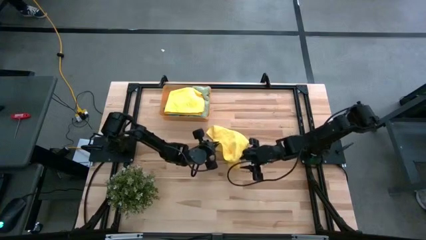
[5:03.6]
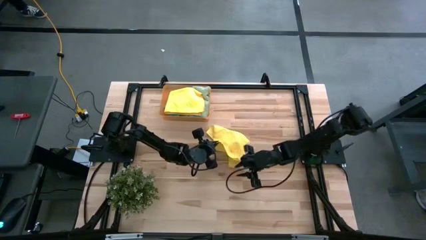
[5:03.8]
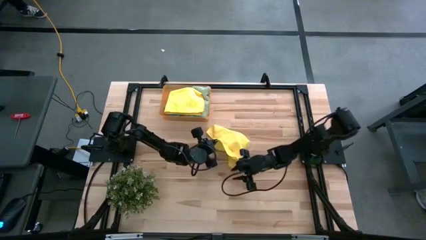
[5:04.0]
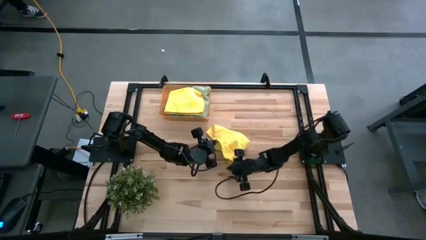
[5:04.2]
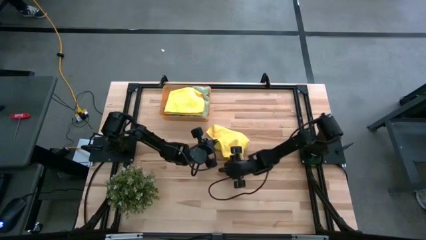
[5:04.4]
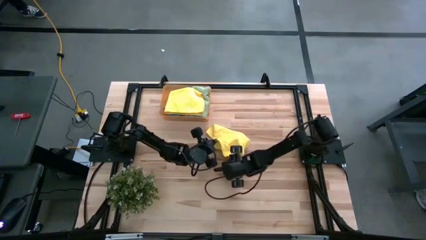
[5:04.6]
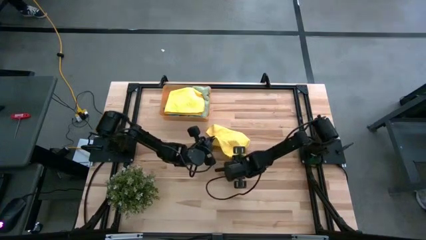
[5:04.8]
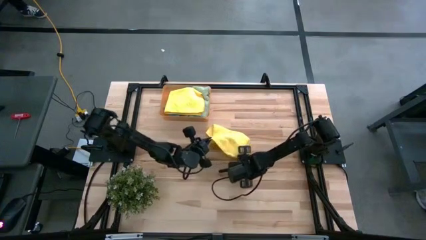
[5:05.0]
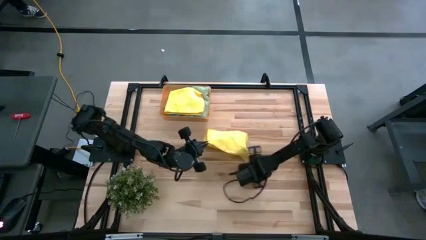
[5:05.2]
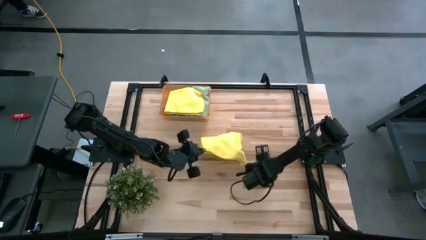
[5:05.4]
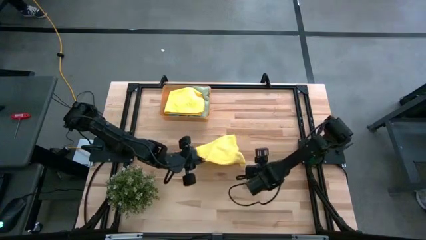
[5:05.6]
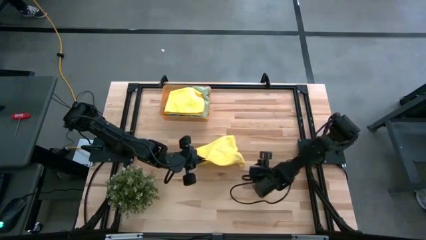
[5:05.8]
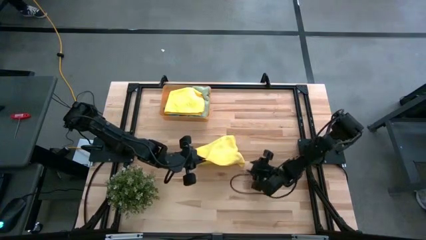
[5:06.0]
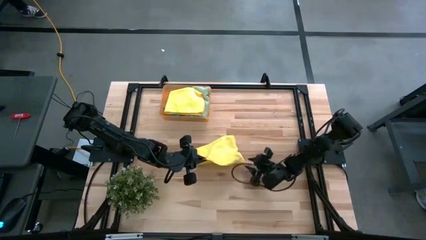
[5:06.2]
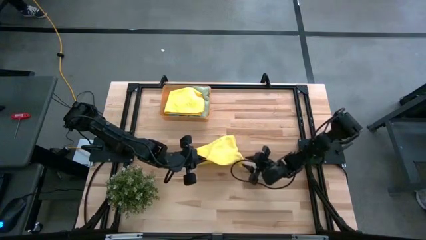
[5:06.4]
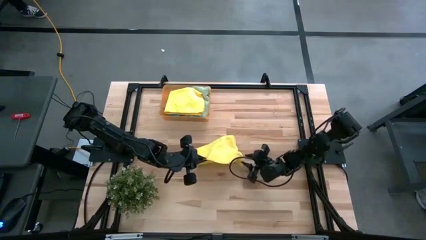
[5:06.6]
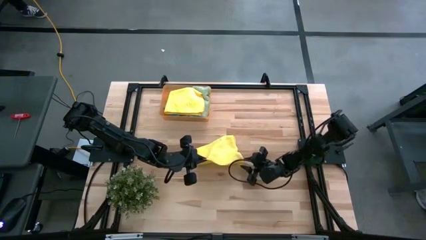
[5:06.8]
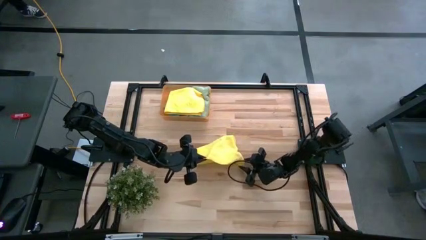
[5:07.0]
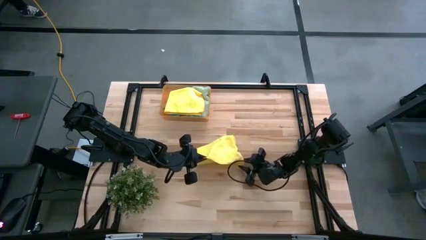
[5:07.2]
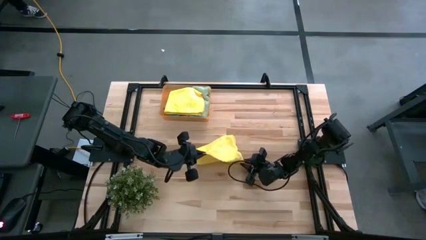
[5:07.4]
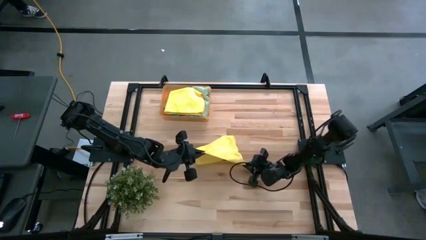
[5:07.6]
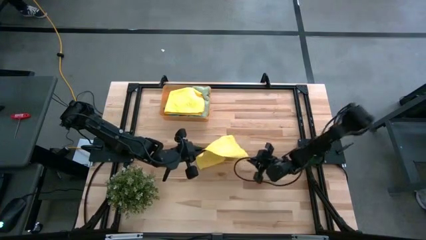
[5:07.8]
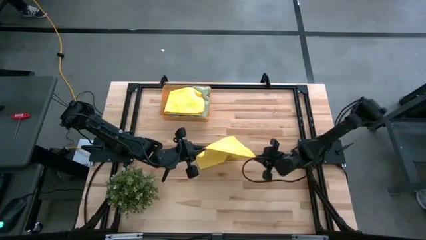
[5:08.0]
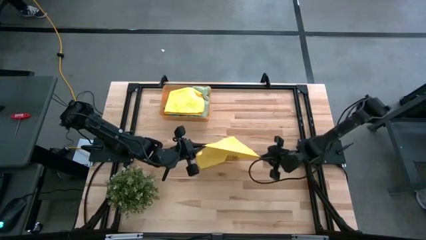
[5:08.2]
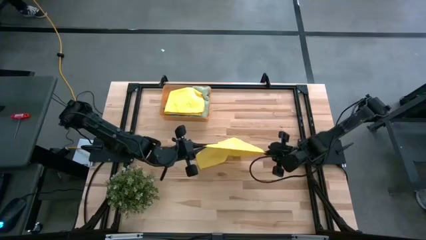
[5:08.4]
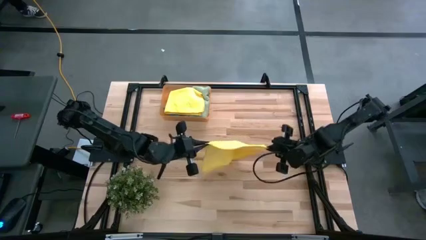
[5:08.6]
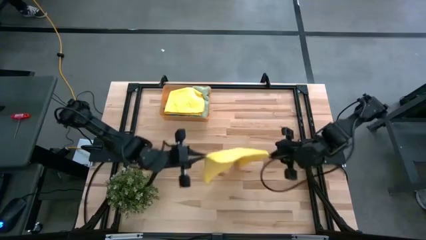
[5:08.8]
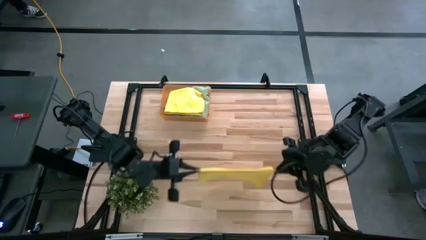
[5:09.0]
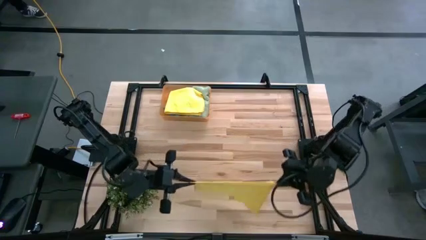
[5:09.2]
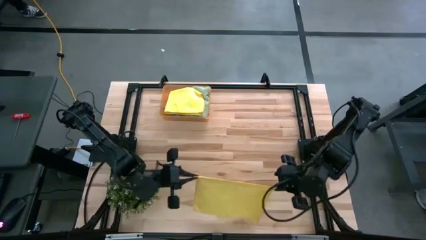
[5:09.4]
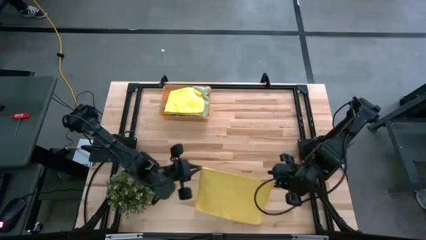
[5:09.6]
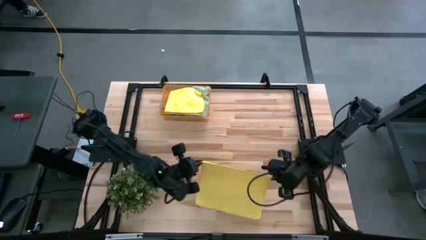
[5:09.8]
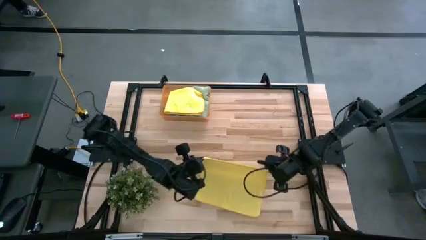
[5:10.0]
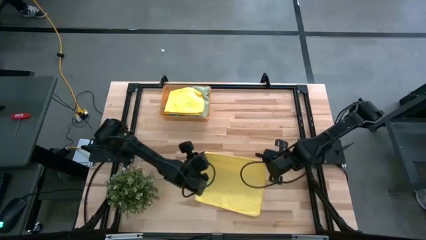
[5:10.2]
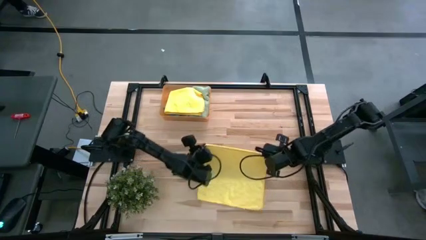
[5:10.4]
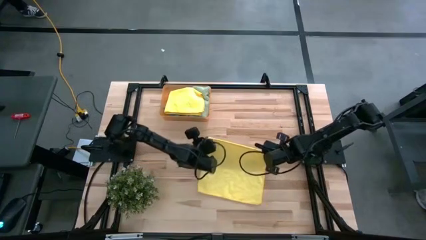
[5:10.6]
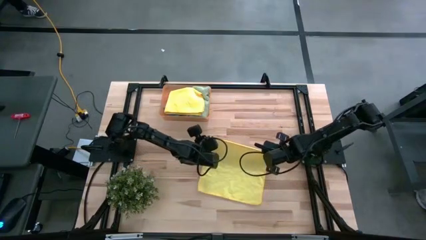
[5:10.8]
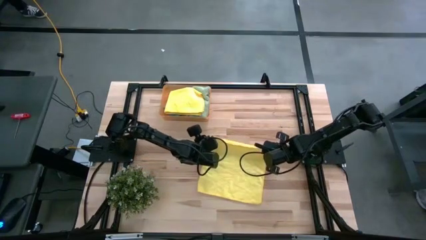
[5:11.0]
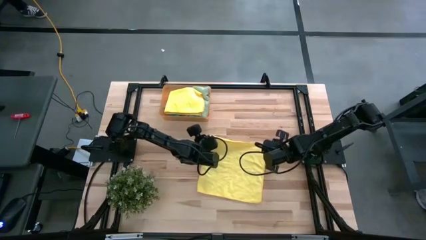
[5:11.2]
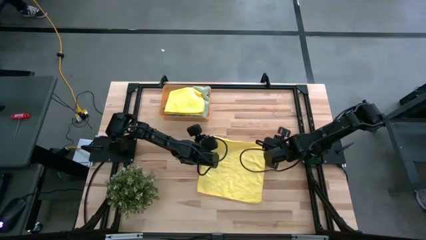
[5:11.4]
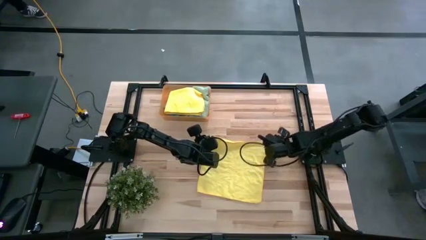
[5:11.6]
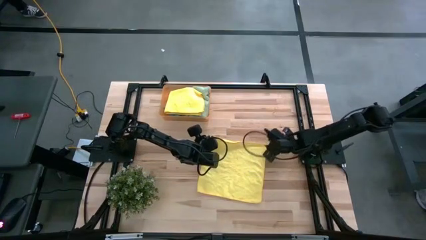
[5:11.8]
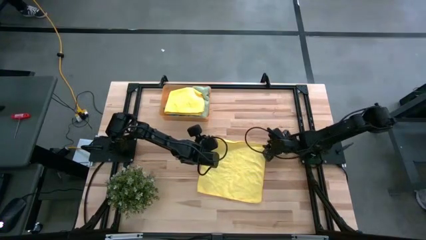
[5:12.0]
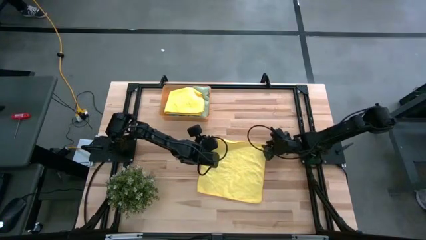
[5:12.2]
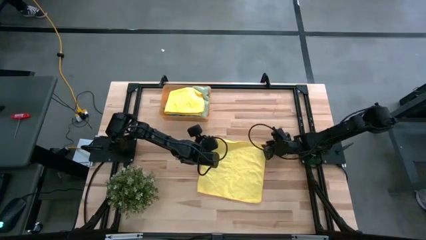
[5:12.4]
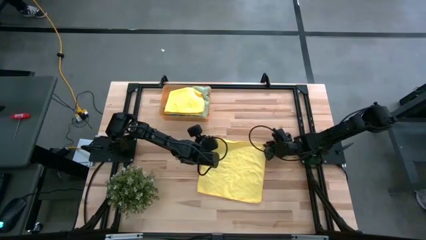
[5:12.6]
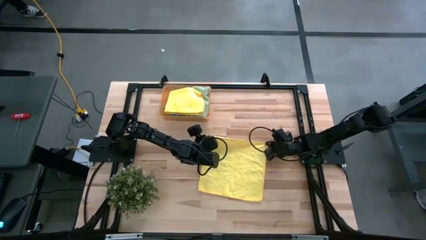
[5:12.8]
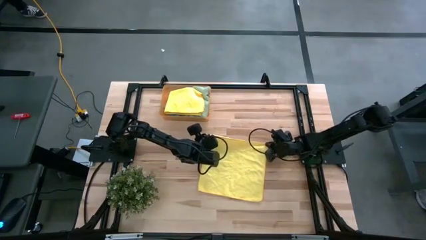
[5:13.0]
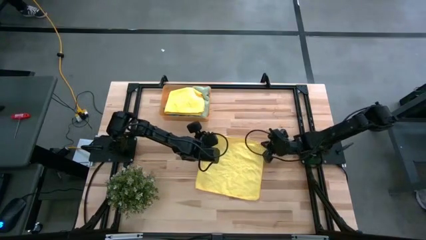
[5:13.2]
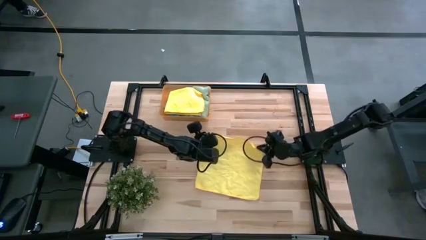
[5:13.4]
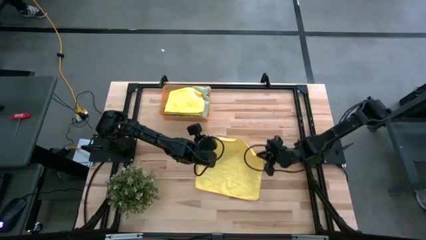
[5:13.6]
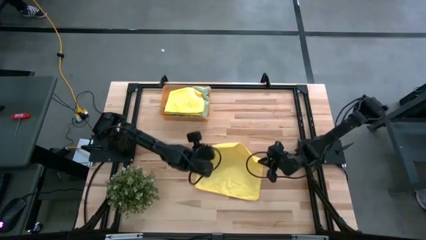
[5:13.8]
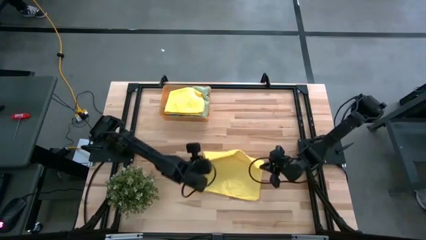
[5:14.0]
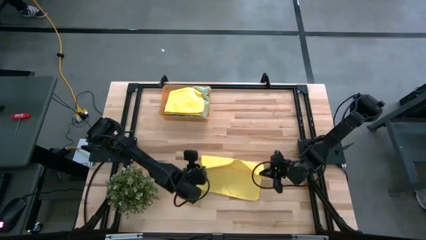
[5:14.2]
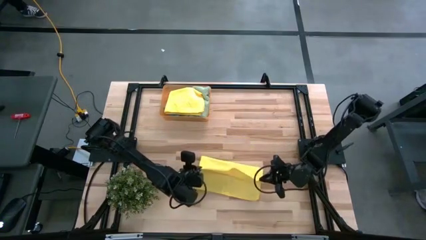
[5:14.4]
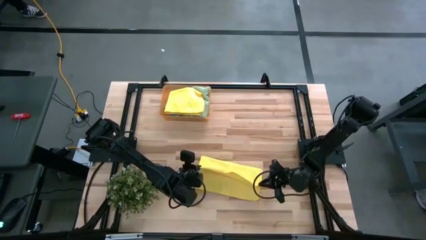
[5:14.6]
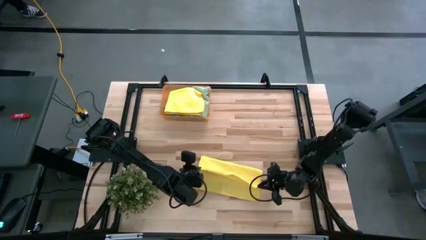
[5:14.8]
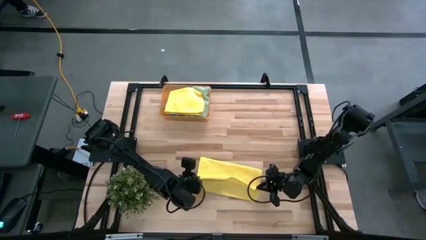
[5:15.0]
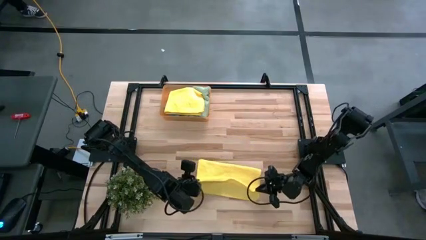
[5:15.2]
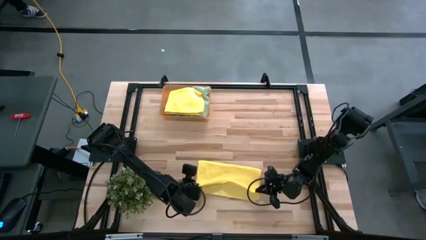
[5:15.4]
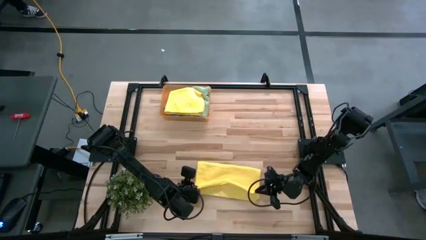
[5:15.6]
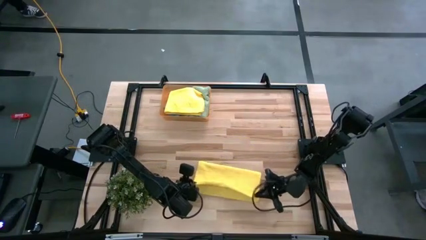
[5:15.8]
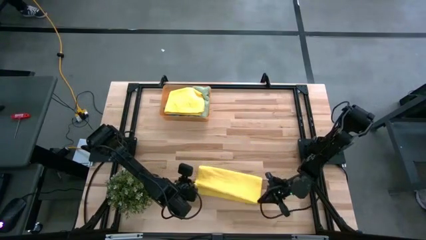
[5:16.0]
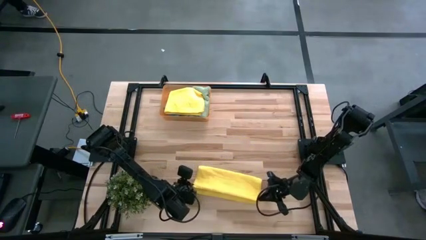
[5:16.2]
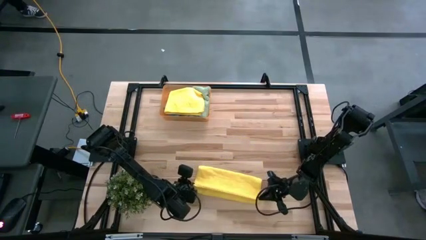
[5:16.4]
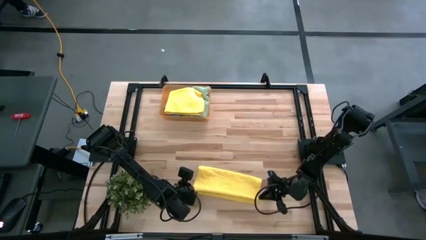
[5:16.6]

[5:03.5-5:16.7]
Task: Fold microfiber towels
Fold the yellow microfiber cloth
